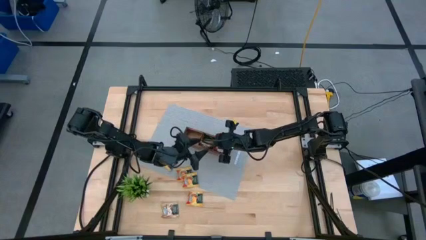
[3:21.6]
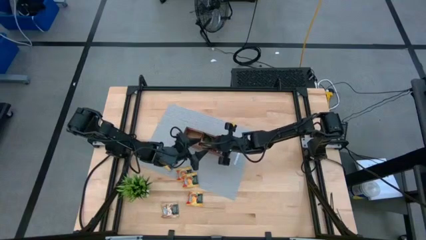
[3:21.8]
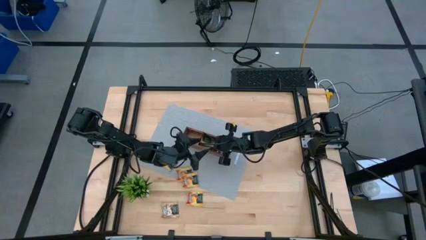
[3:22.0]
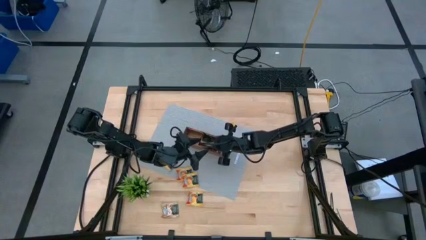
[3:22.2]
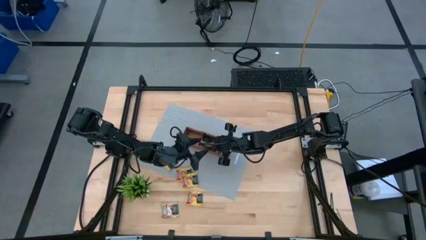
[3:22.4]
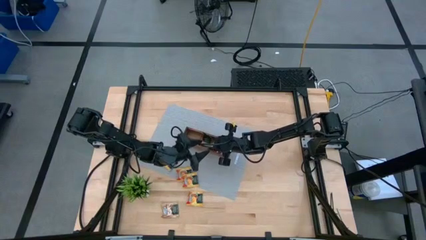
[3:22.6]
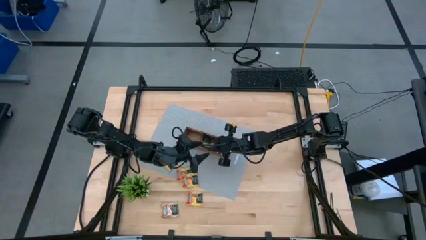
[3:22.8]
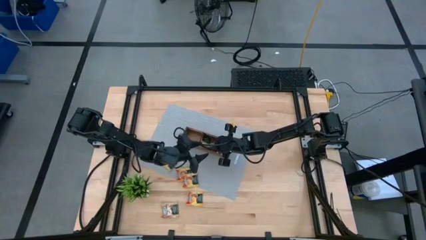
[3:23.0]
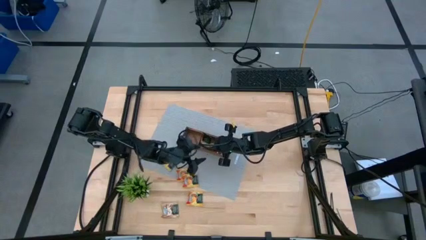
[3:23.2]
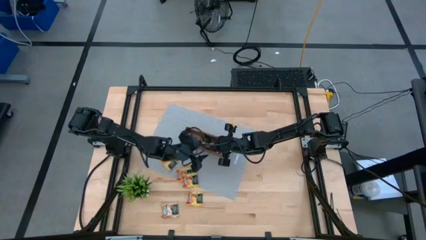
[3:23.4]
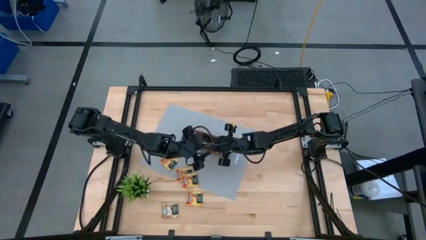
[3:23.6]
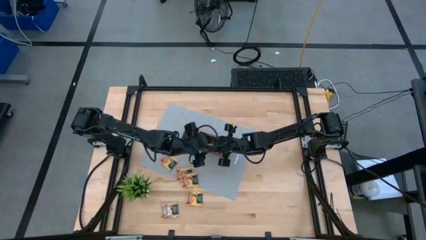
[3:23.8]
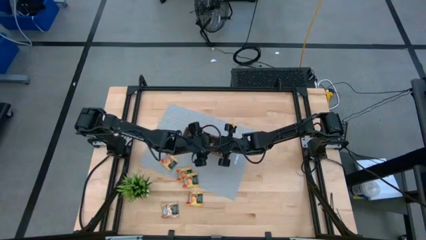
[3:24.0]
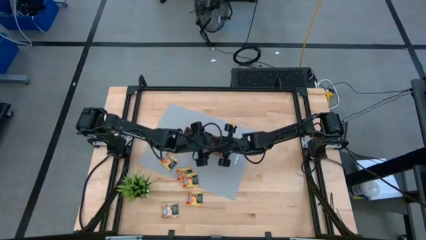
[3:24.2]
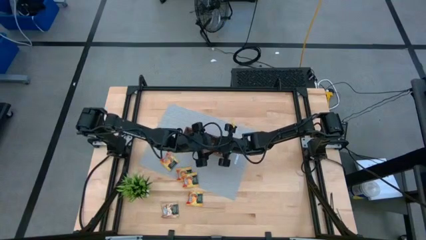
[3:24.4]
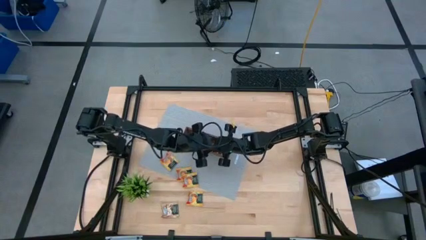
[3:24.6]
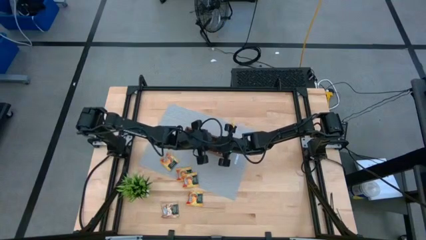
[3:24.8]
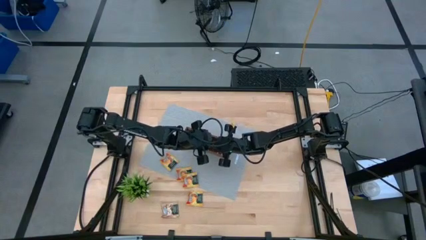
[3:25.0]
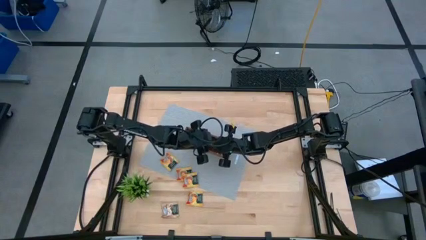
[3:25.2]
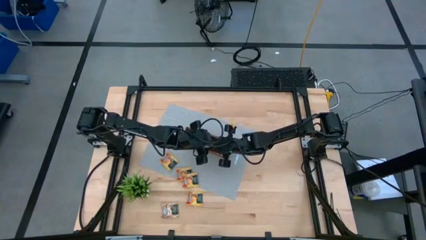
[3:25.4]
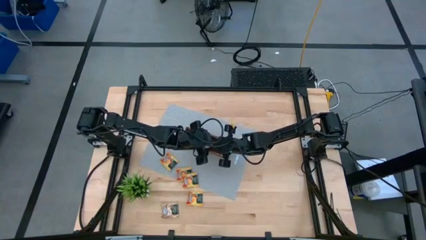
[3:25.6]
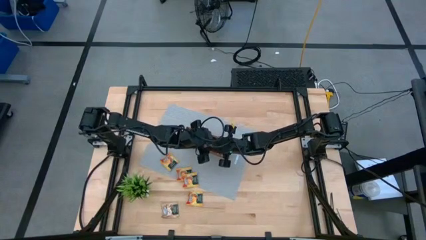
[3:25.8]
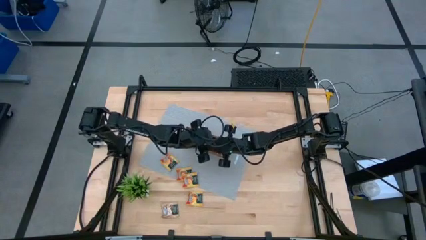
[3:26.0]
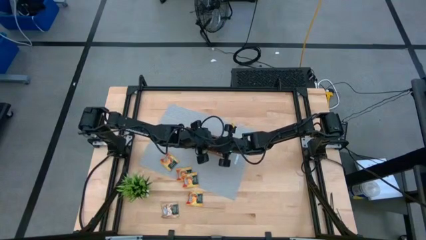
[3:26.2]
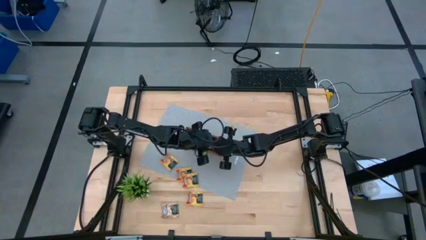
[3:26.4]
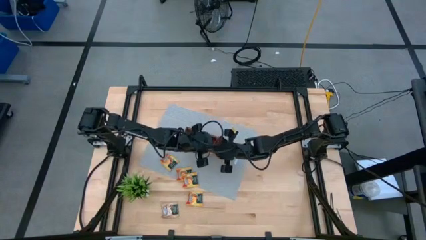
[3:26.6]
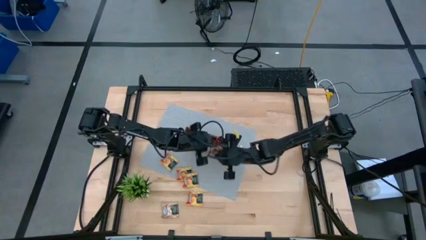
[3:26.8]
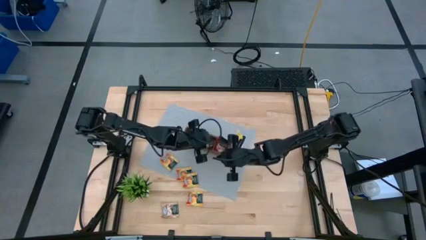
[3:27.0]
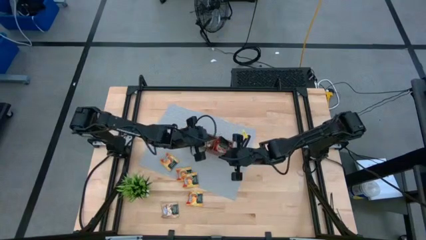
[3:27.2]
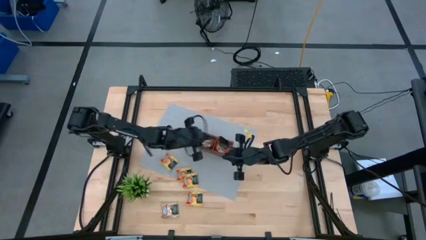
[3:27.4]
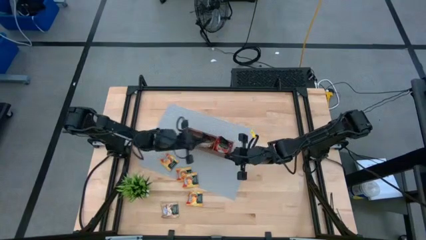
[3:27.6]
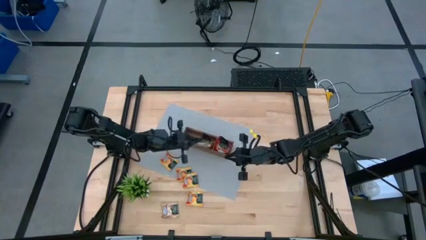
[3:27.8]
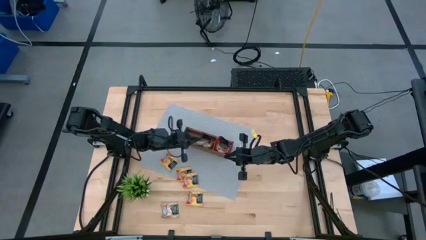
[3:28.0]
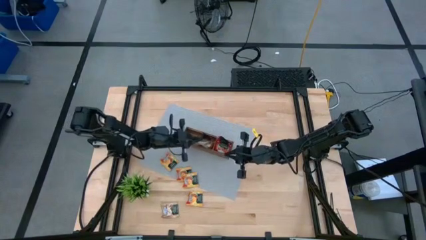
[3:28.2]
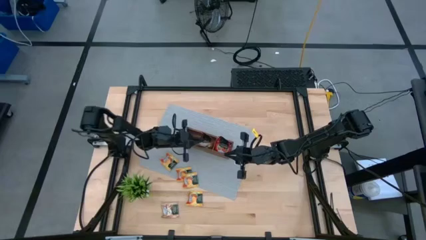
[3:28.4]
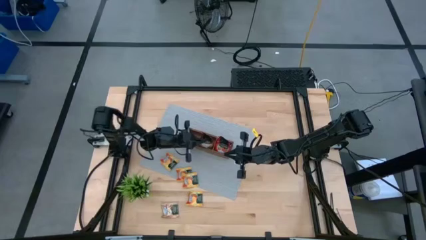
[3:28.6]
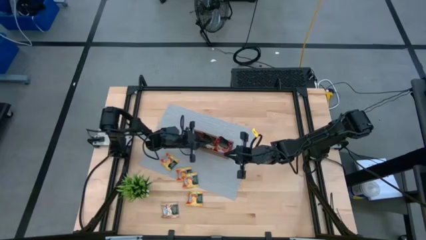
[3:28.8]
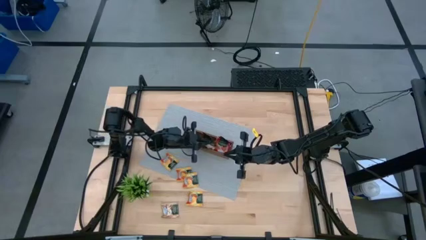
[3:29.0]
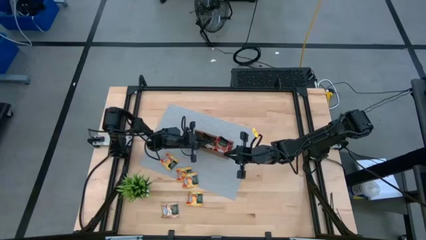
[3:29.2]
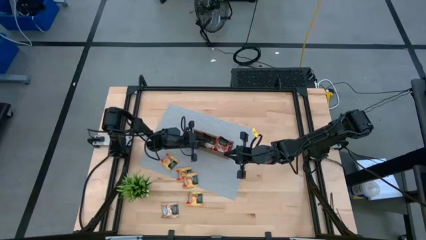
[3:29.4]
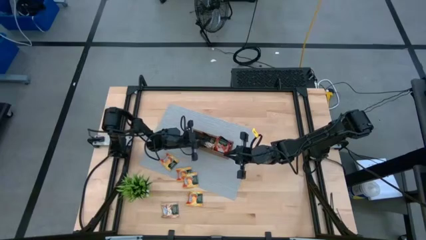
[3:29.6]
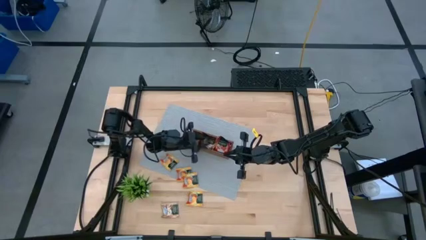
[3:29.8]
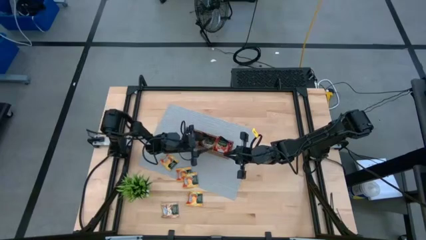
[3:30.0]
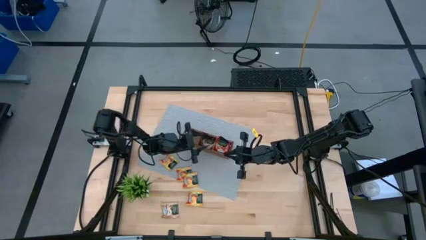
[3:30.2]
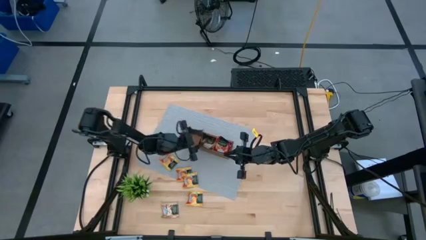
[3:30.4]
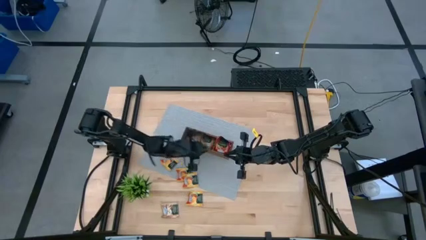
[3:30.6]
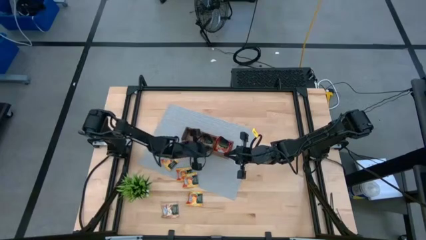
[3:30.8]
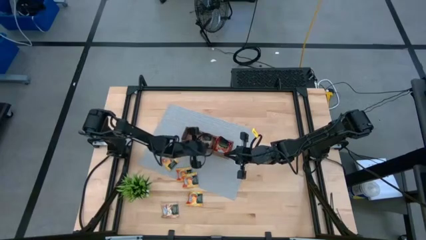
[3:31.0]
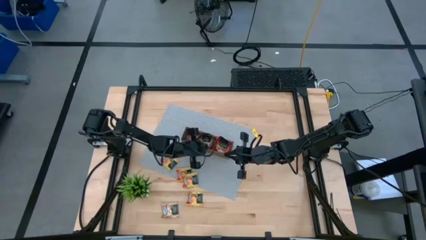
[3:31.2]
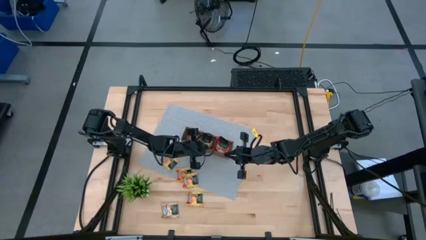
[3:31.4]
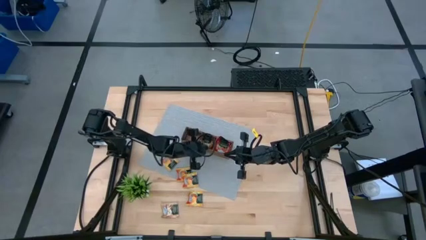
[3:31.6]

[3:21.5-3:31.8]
Task: Pick & Place Tea
Put the brown tea bag into the wooden organizer

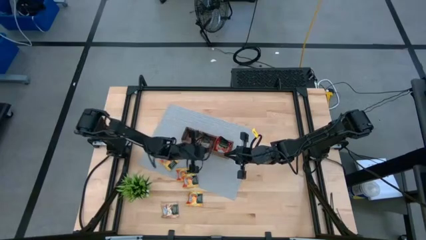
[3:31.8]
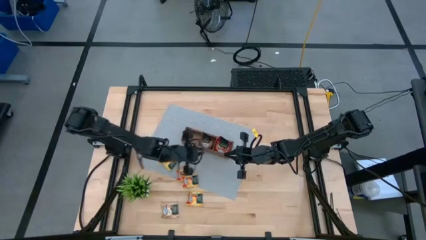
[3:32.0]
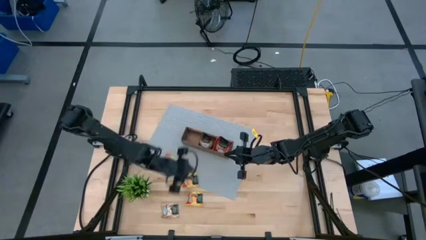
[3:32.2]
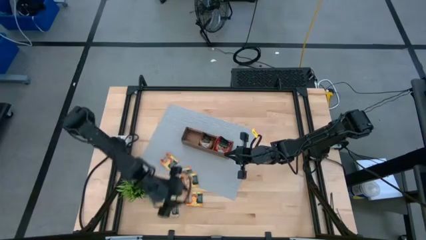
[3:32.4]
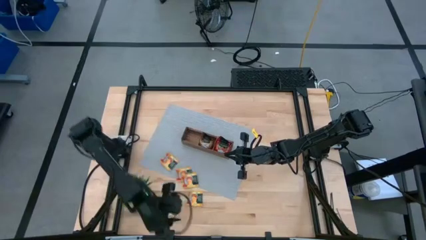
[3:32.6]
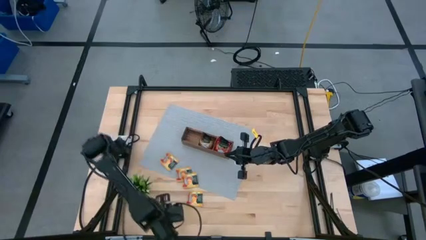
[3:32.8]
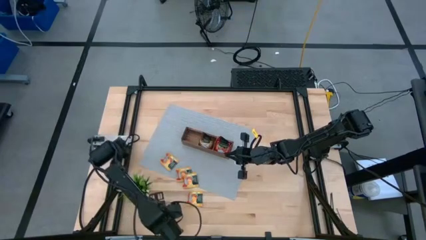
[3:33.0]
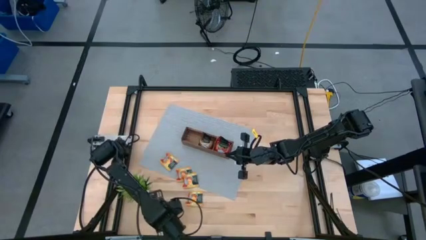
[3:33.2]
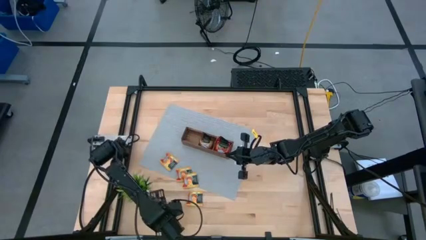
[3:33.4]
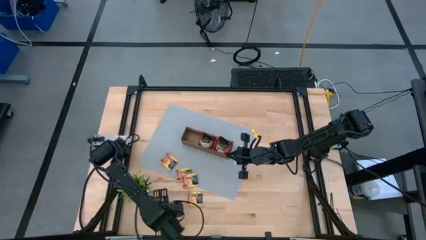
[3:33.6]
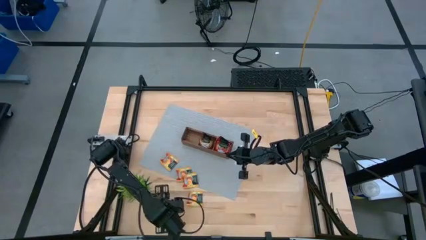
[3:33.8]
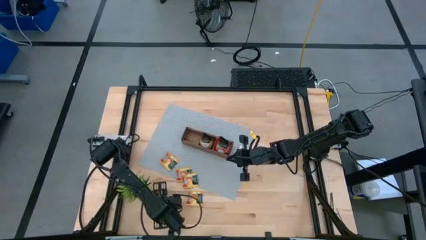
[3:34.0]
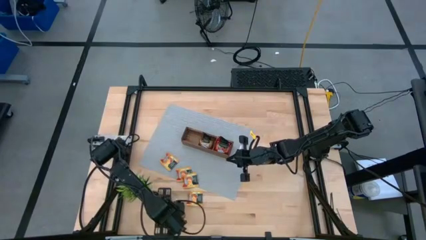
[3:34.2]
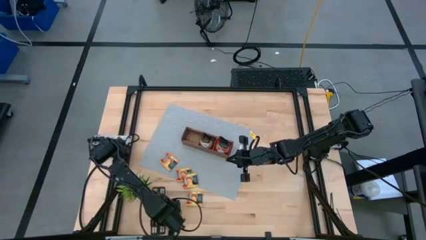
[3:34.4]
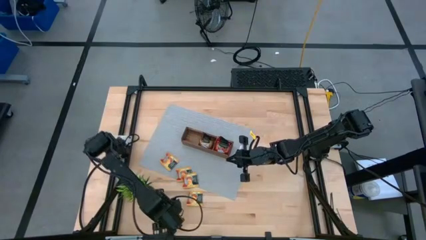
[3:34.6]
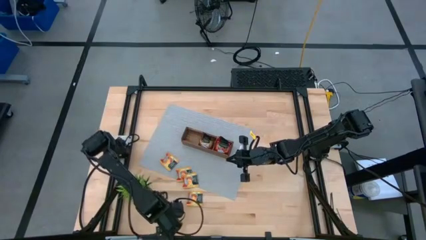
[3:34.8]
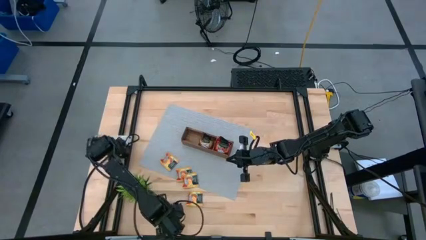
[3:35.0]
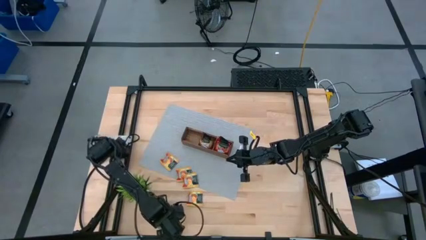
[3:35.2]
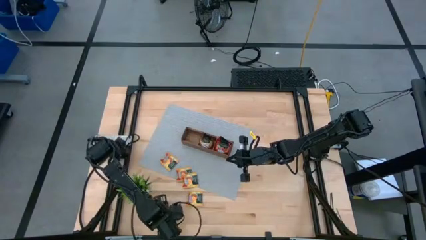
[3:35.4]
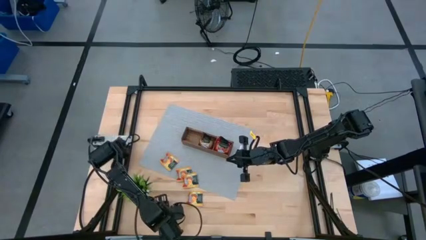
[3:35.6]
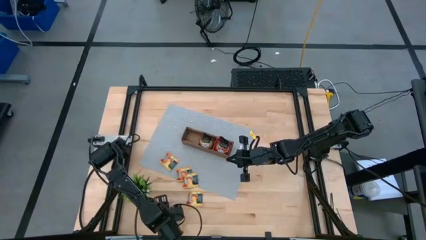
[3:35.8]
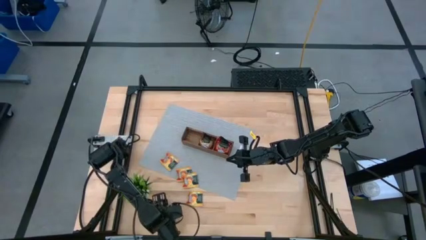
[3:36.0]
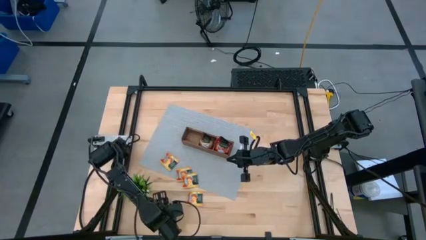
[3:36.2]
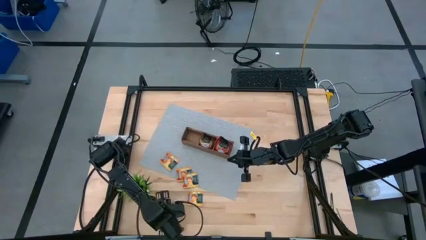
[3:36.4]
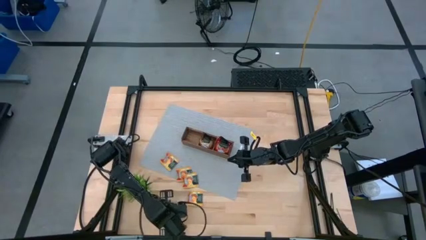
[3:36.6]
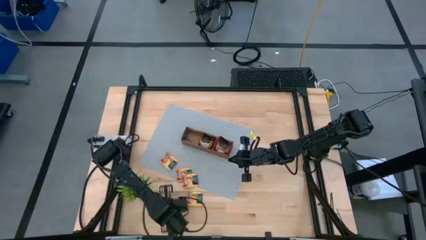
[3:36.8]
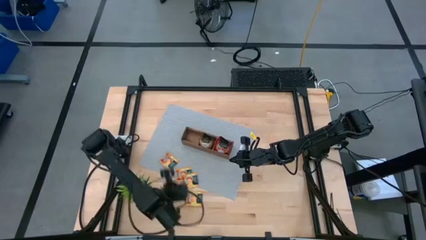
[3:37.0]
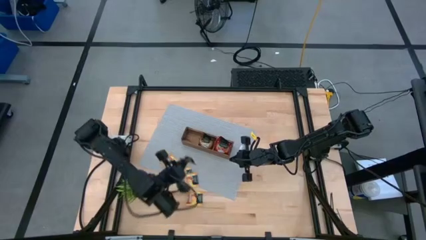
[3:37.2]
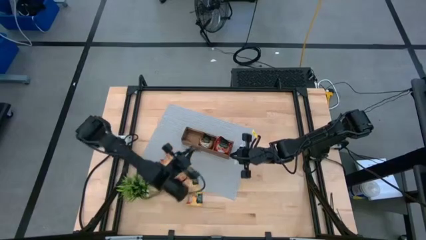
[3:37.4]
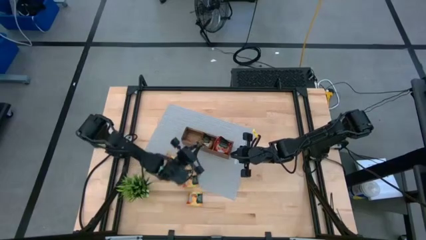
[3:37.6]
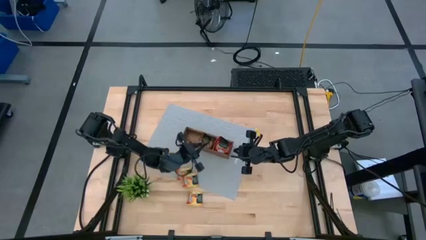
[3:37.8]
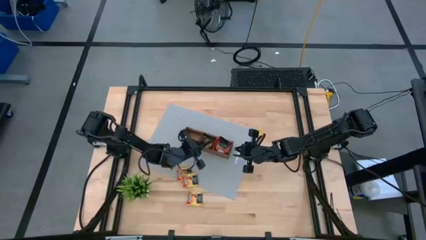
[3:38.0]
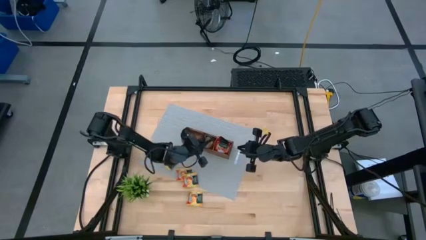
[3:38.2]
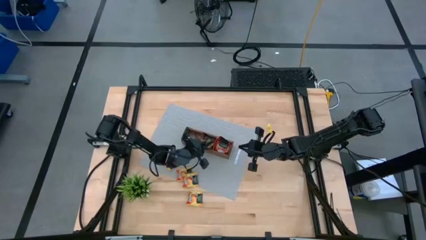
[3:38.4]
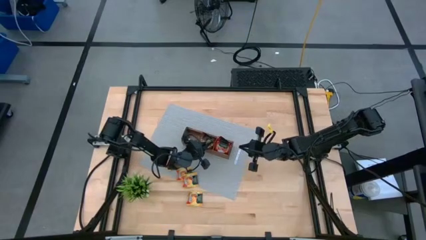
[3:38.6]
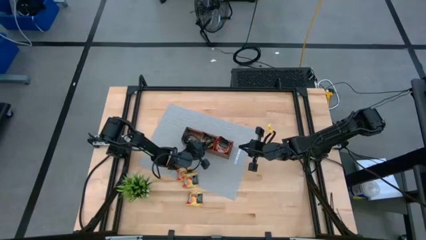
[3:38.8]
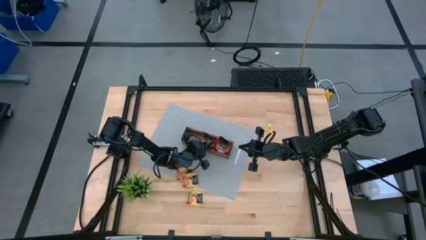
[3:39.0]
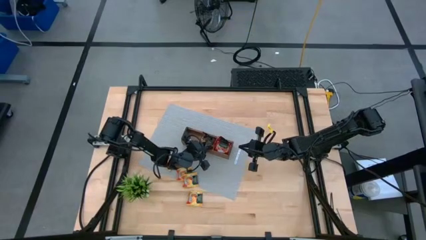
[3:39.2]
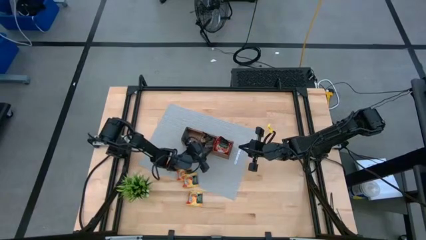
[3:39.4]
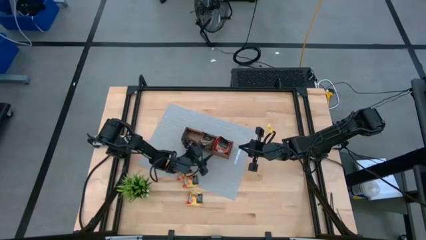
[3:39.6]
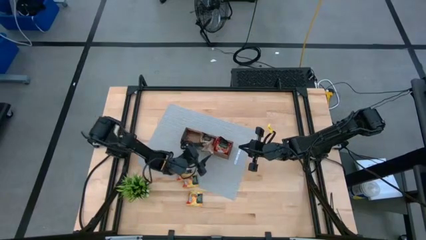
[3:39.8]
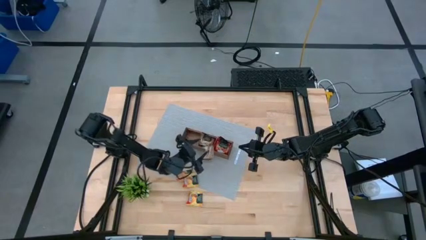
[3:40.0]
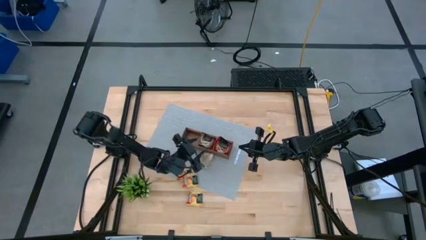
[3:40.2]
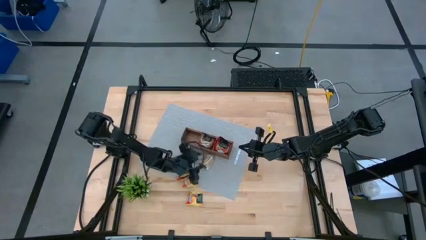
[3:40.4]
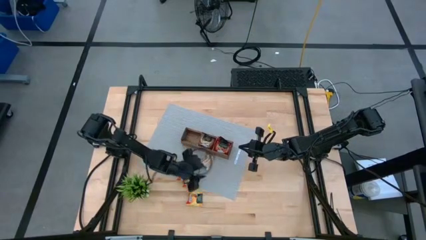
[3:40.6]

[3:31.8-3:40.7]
Put the brown tea bag into the wooden organizer
